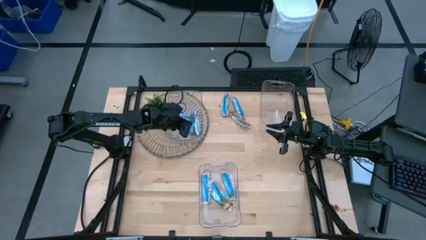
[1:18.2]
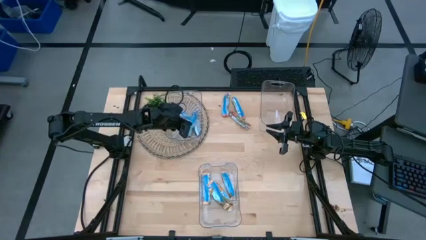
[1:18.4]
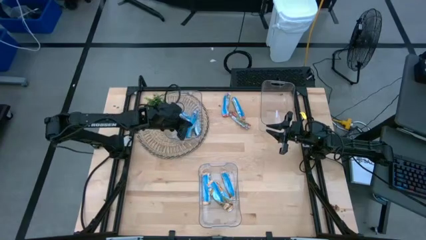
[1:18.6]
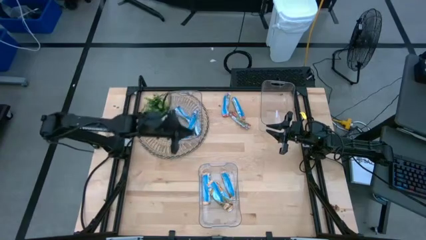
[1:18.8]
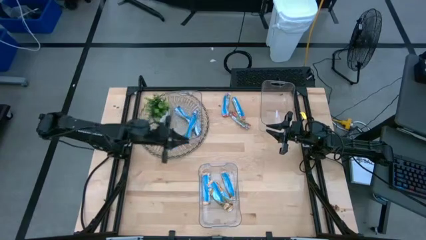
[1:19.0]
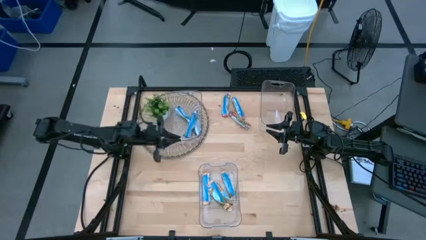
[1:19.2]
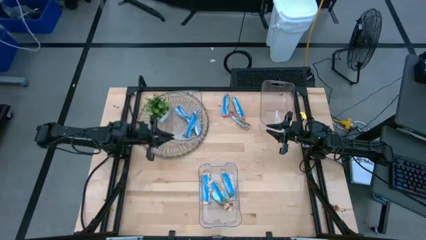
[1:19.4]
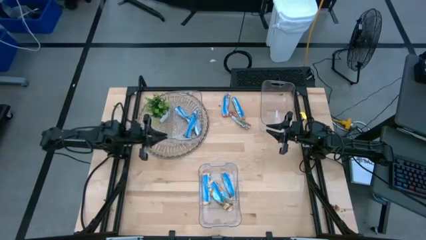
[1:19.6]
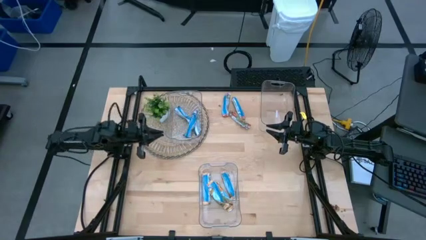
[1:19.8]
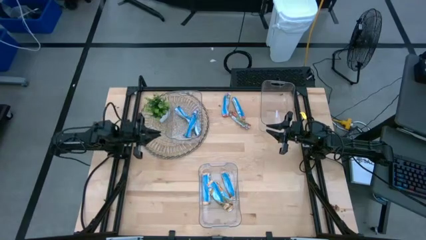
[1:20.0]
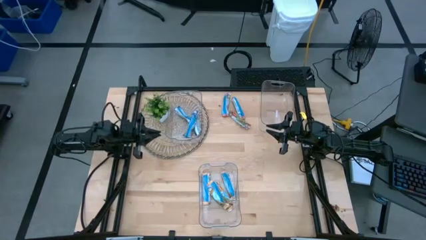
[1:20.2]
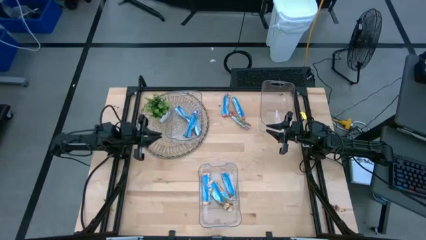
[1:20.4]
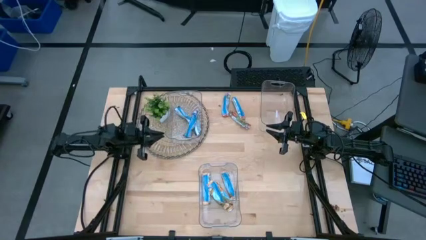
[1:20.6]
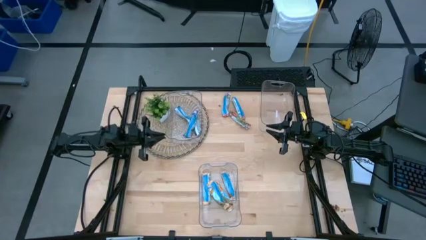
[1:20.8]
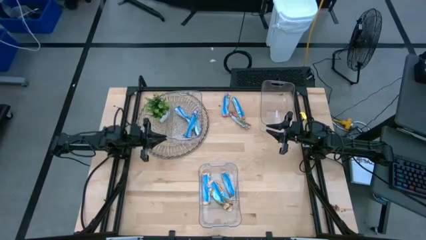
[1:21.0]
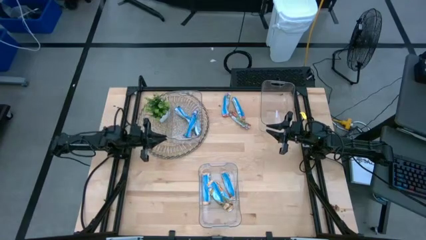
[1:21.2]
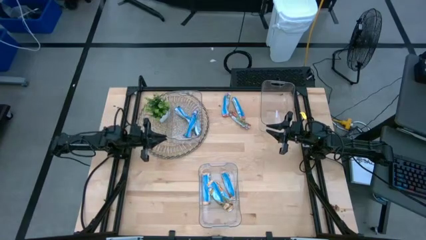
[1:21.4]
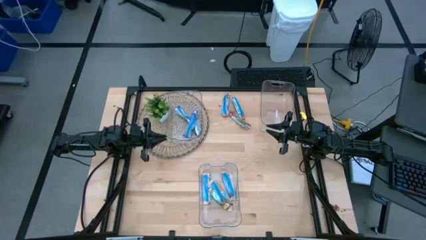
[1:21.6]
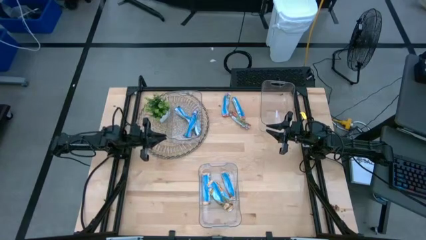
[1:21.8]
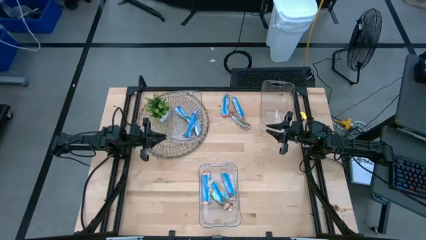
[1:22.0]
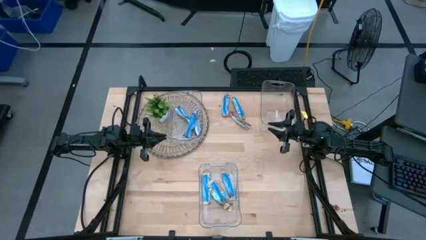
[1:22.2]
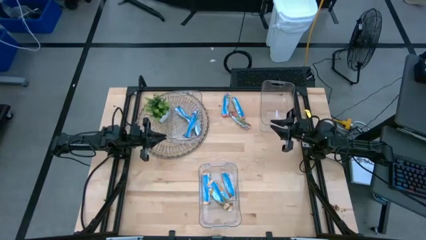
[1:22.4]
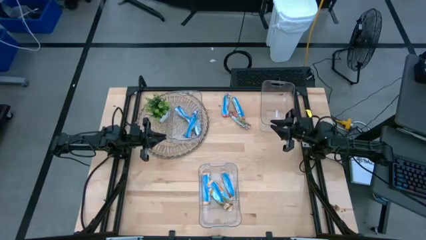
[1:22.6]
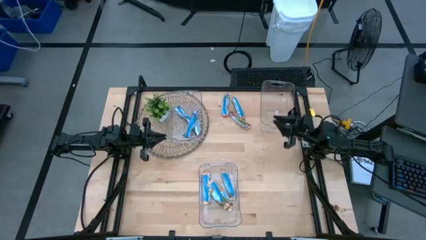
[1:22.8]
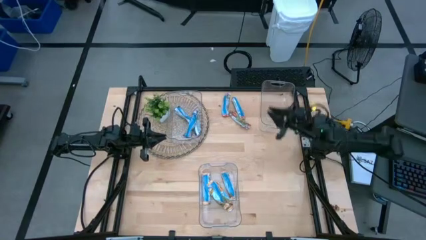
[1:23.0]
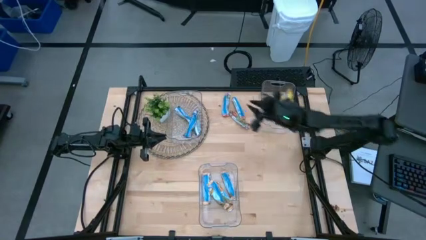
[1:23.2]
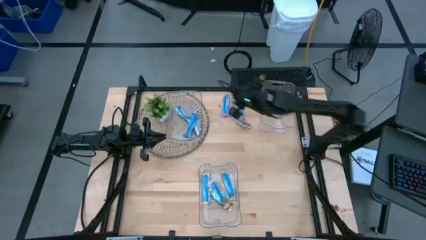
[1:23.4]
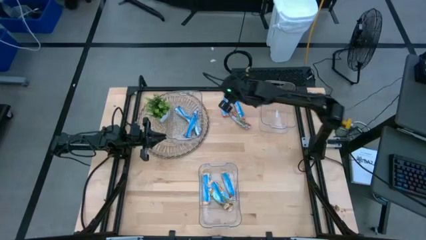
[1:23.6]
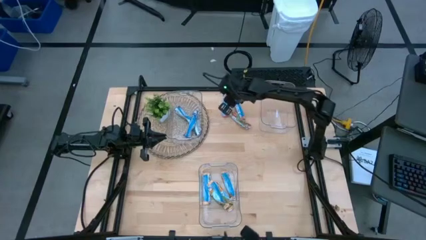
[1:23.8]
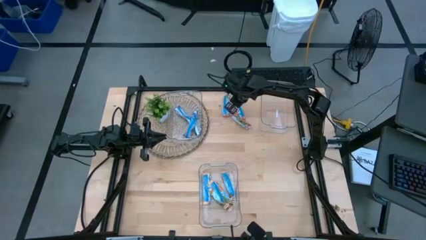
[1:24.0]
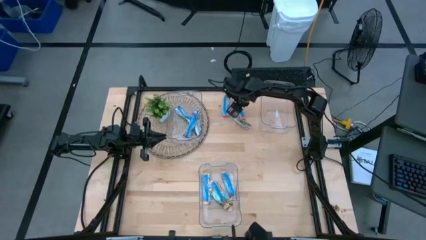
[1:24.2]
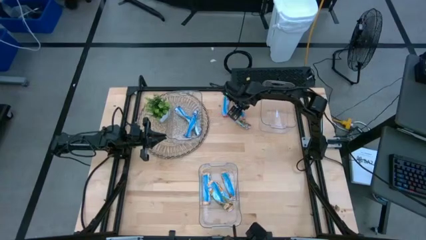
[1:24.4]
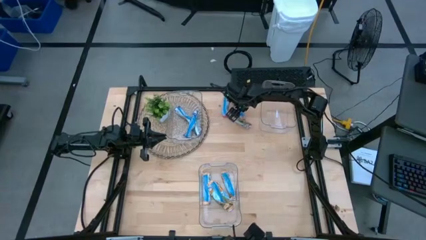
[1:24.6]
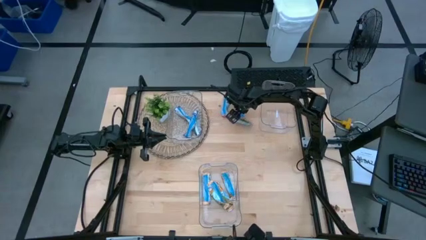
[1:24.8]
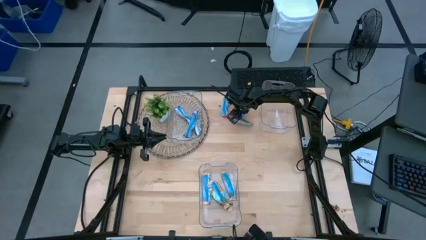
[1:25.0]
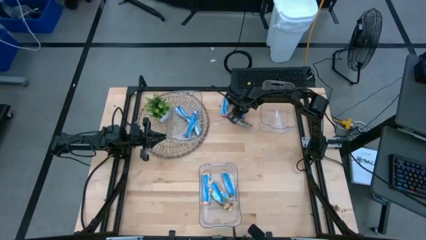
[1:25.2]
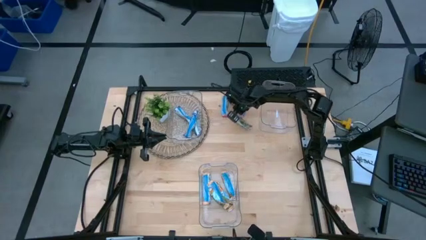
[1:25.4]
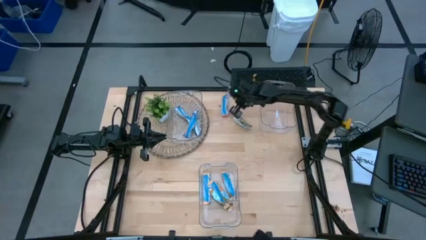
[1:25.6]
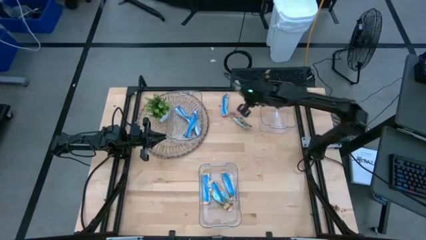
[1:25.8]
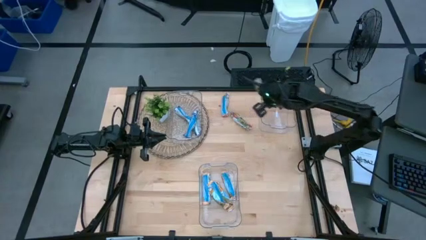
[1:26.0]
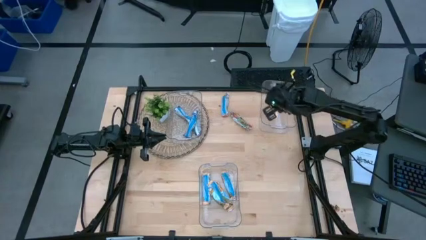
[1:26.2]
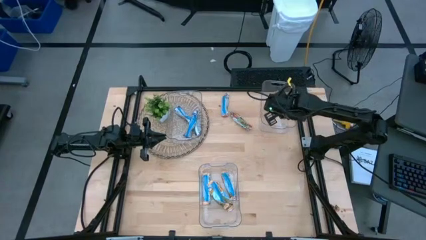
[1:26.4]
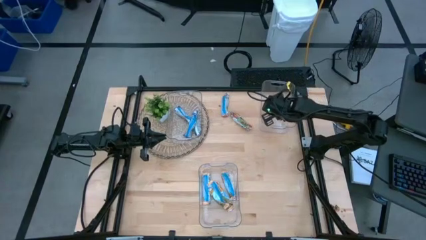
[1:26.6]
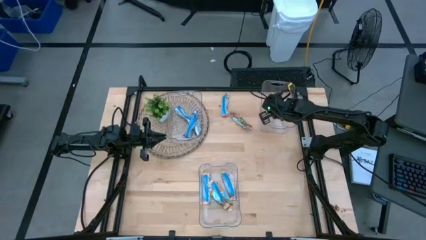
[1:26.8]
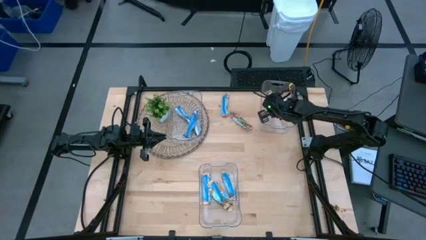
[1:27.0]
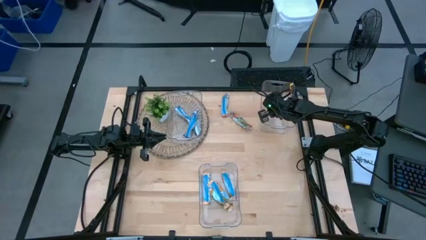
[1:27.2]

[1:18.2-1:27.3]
Task: Pick and place Granola Bars by type
Put the red granola bar into the top right transparent bin

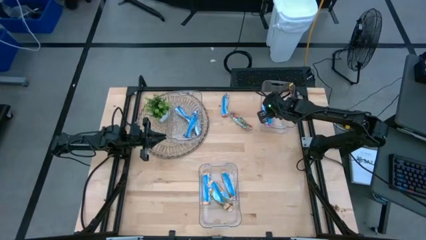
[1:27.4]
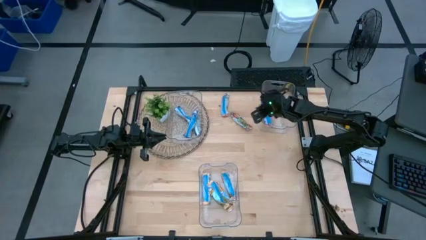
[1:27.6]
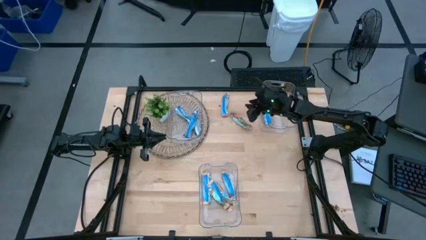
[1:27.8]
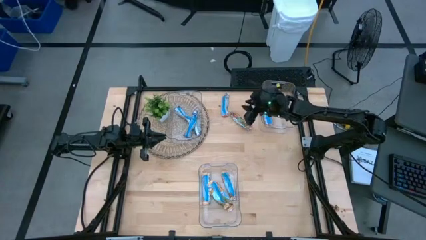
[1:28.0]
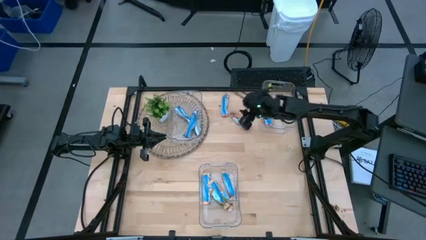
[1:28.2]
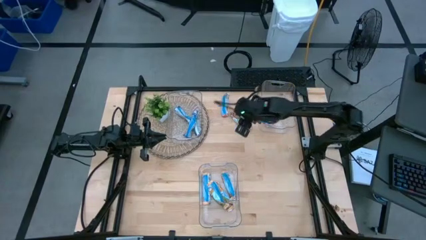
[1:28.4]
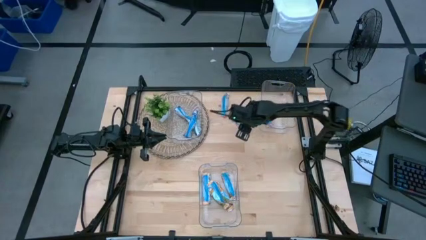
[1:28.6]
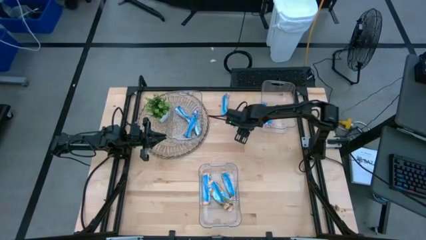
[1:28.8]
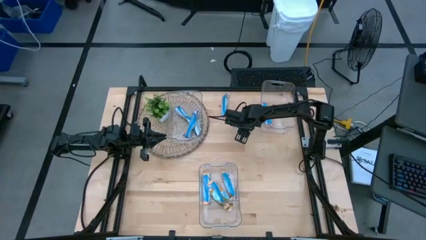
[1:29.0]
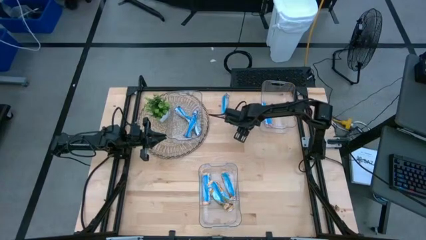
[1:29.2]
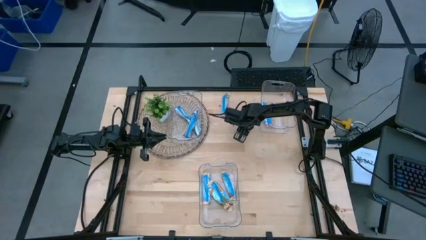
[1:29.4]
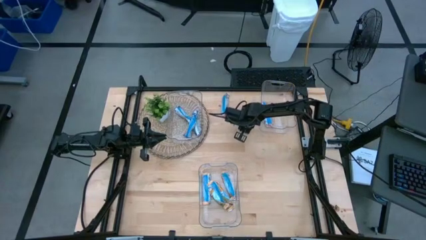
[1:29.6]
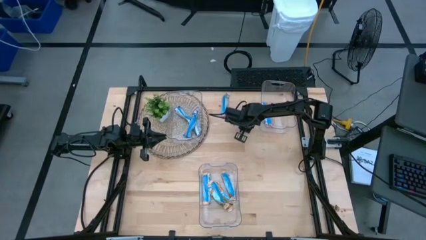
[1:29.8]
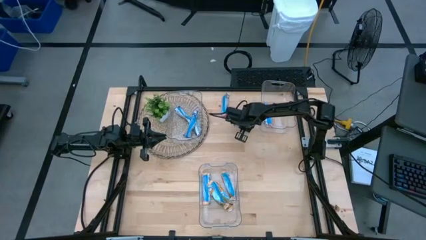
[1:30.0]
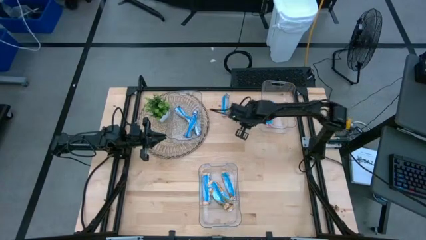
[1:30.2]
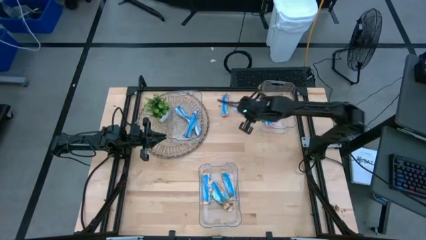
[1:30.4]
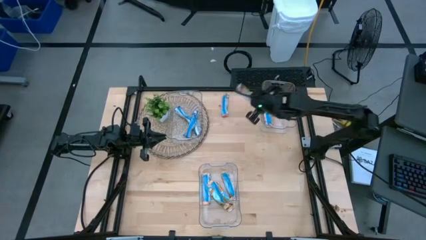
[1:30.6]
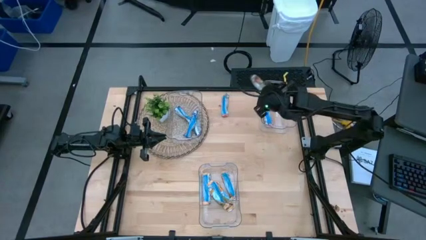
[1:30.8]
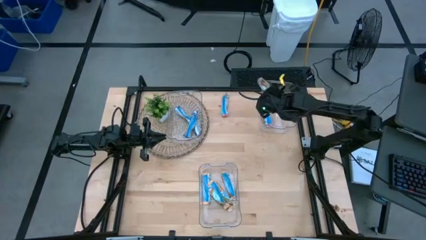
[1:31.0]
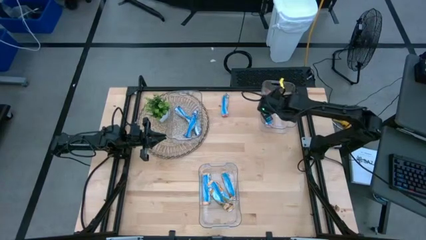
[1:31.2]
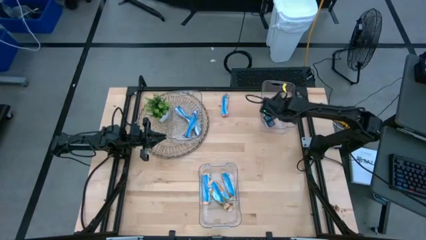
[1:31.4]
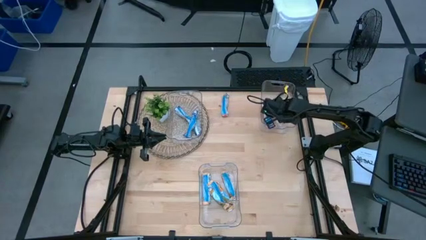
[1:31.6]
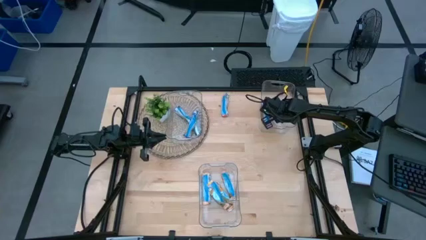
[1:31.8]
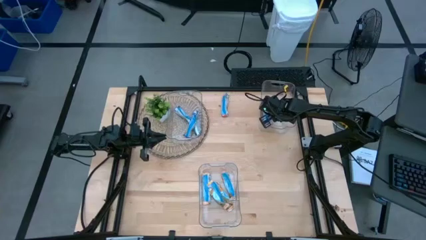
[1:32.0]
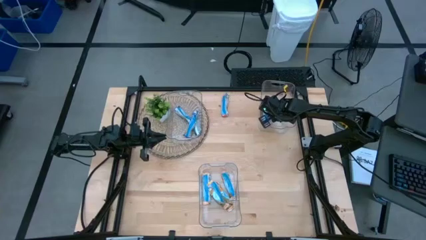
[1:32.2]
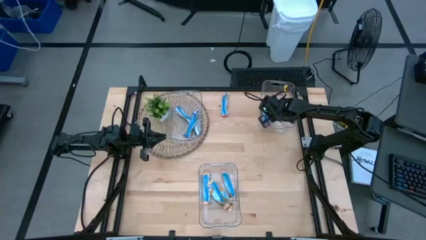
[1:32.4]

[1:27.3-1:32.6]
Put the red granola bar into the top right transparent bin
